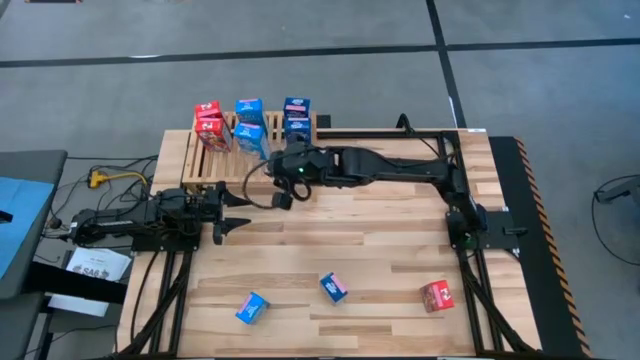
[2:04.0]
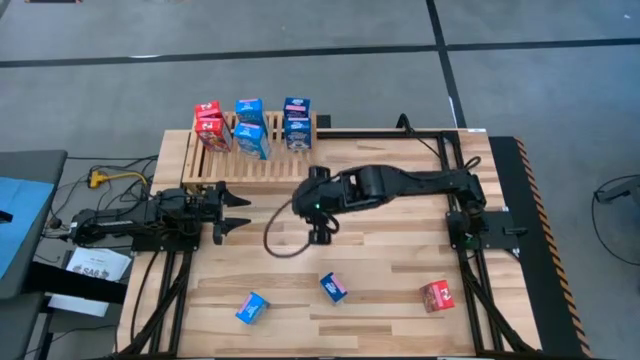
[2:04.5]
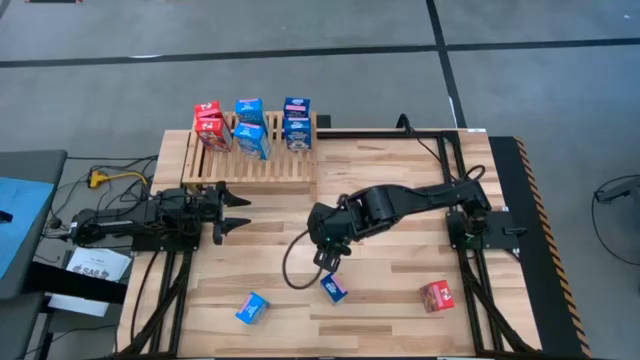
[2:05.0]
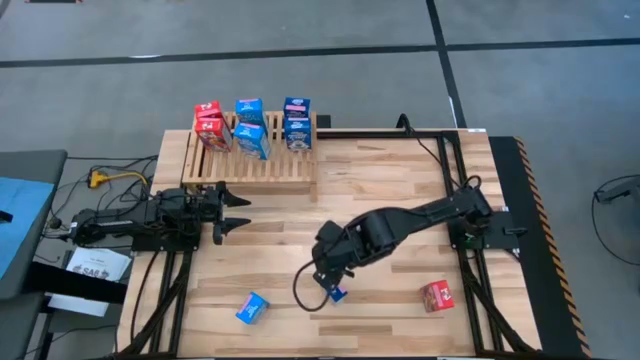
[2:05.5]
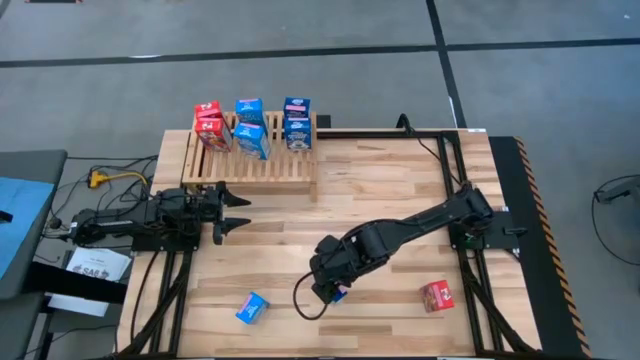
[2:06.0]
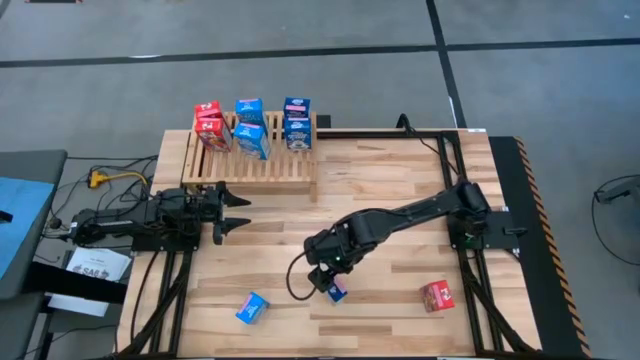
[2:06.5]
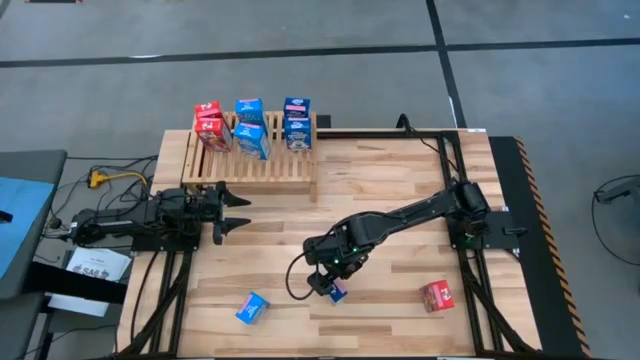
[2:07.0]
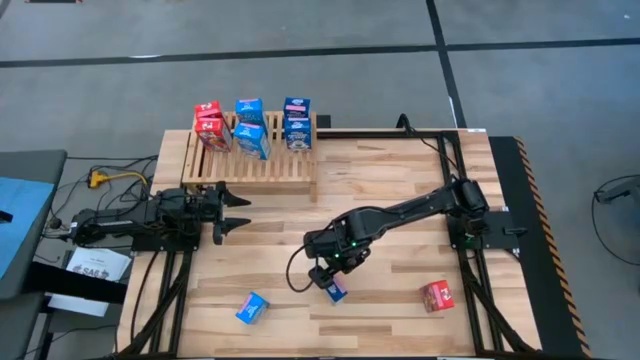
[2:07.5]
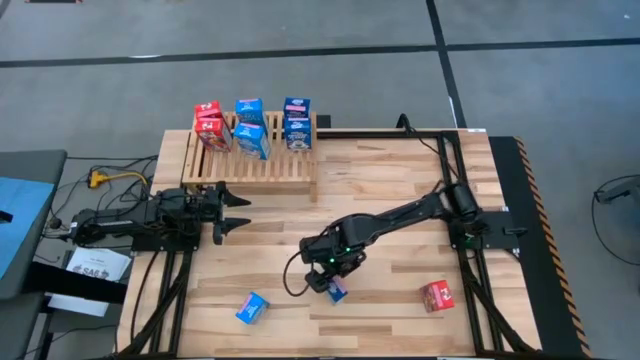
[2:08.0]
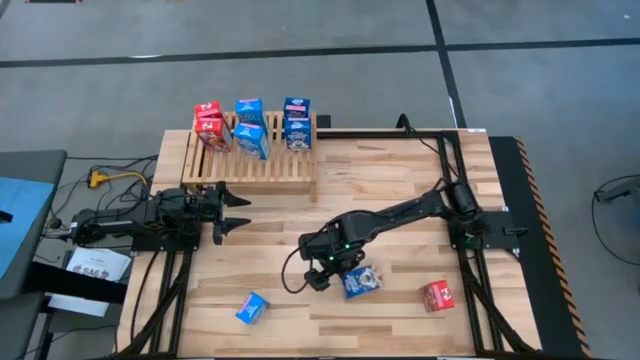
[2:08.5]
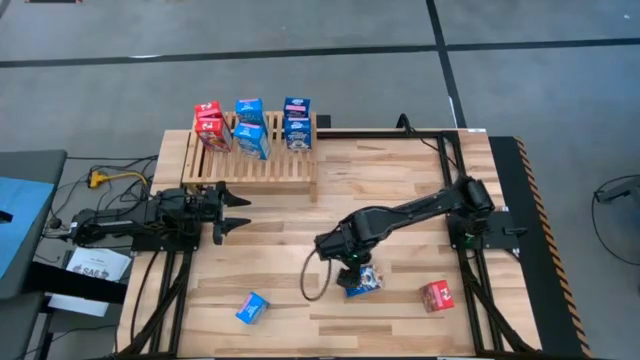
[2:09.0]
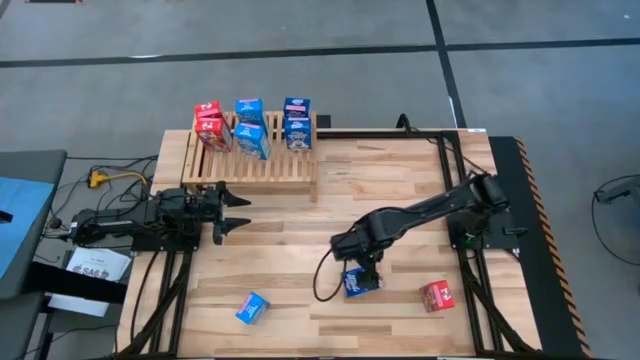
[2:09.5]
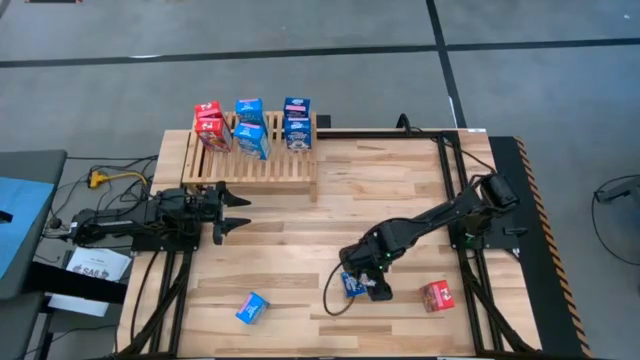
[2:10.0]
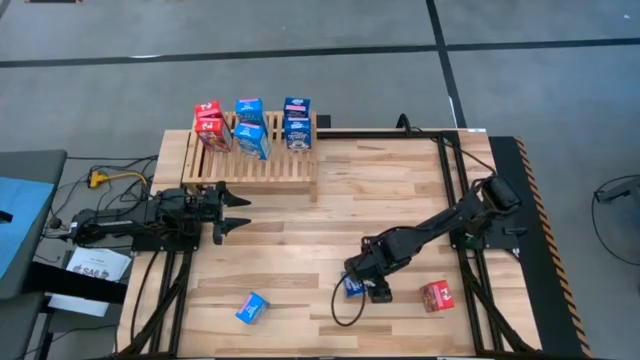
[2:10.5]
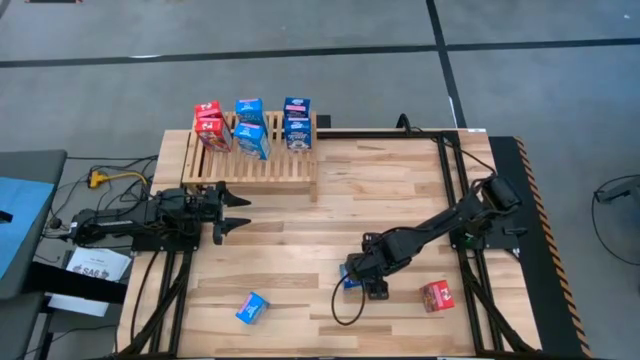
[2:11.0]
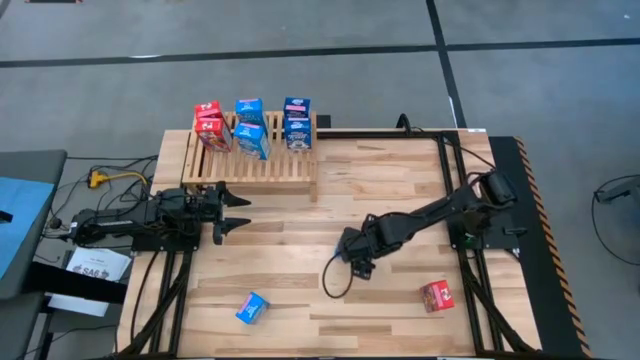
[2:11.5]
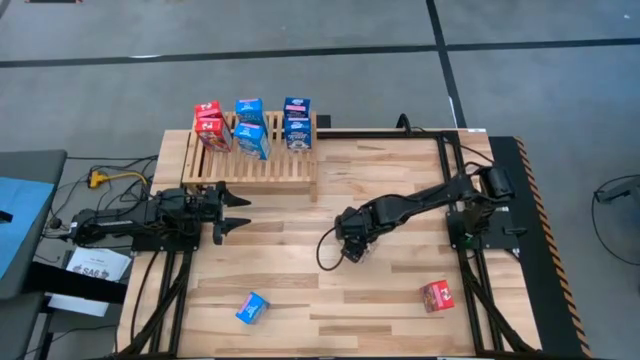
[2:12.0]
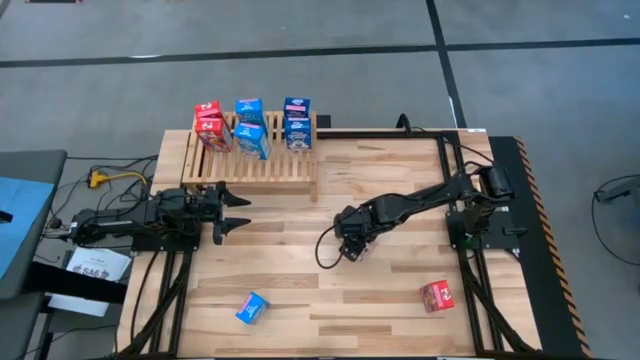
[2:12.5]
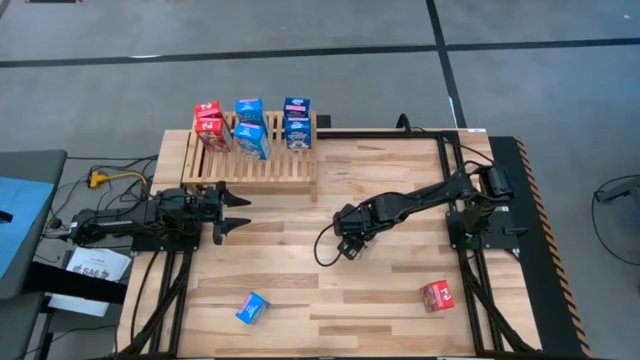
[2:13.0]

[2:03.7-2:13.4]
Task: Stack cereal on shelf
Put the dark blue cereal box the aligned with the other dark blue cereal boxes on the shelf

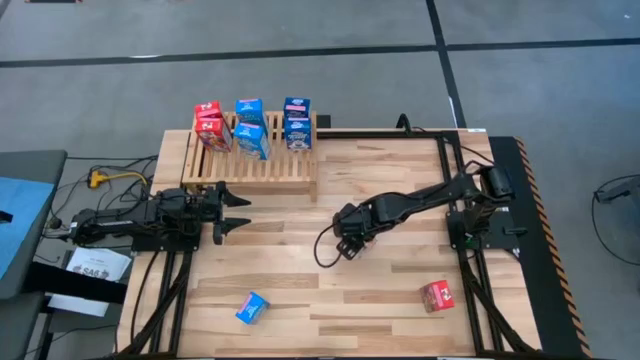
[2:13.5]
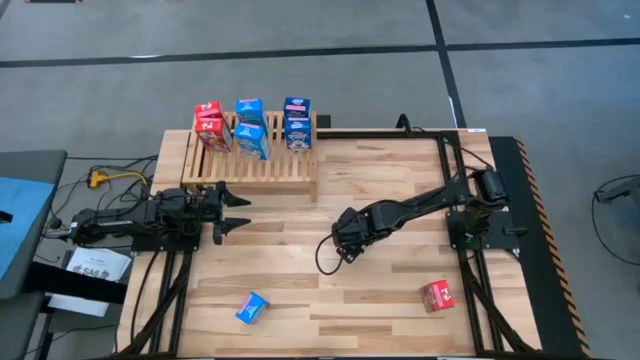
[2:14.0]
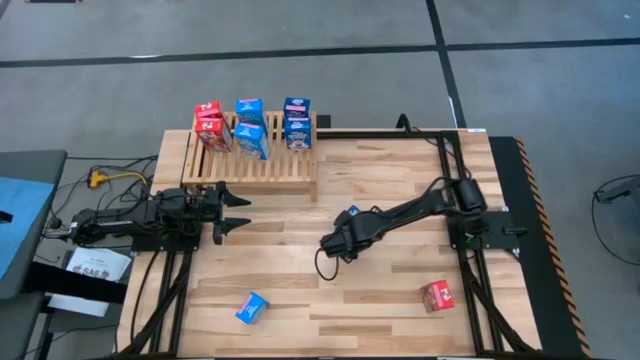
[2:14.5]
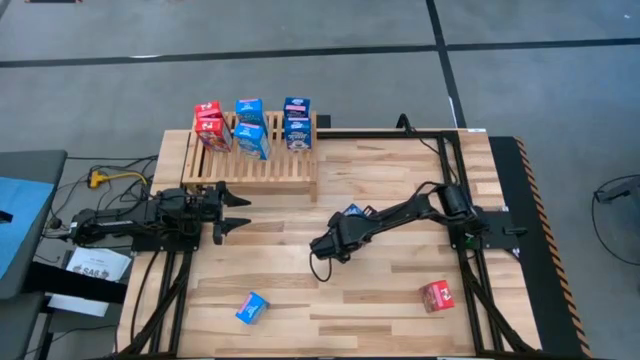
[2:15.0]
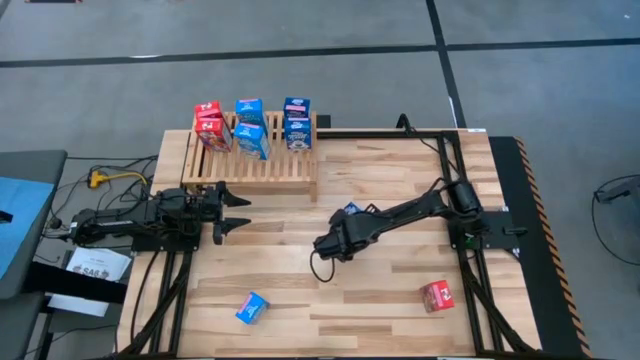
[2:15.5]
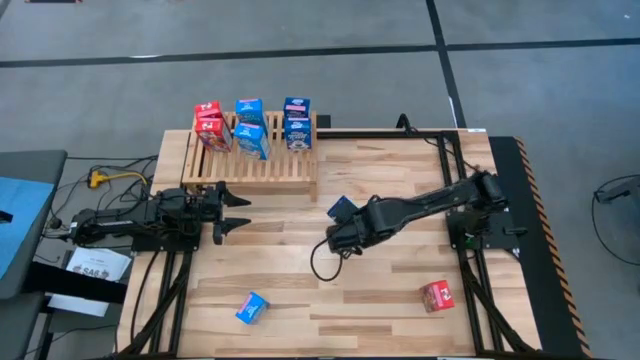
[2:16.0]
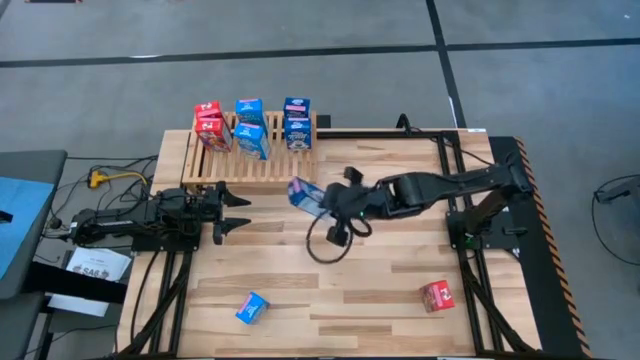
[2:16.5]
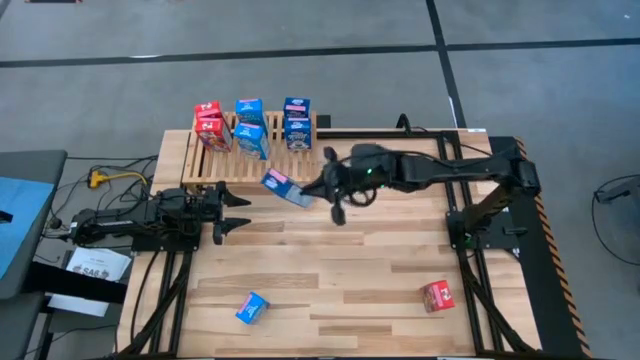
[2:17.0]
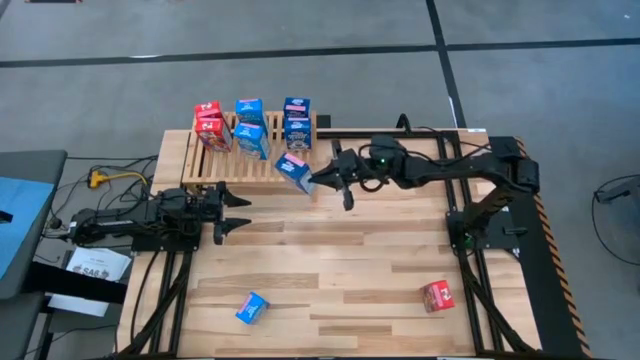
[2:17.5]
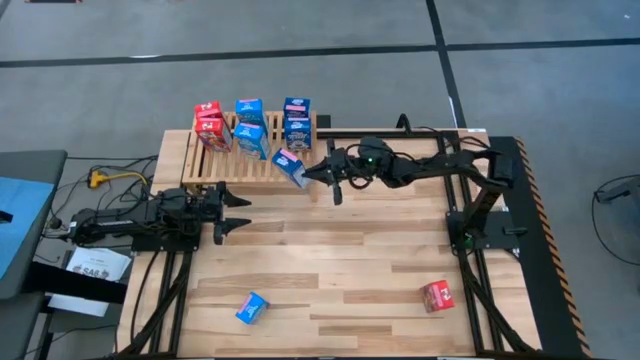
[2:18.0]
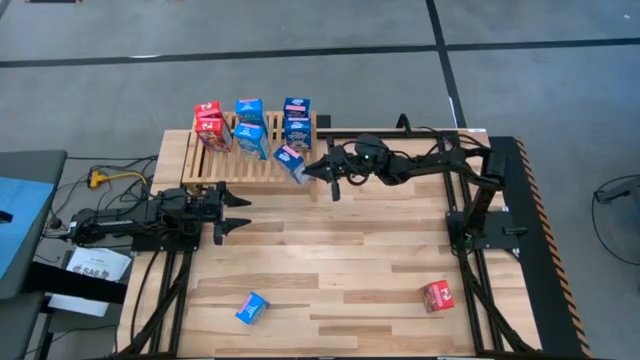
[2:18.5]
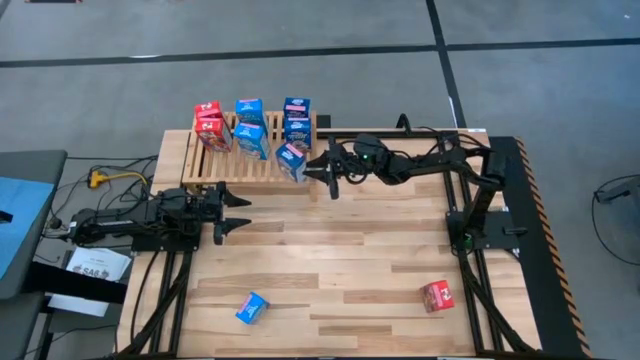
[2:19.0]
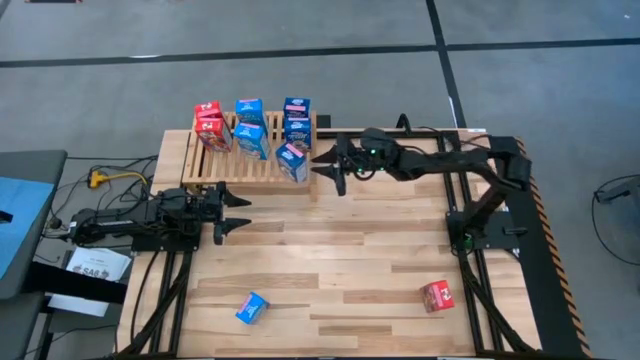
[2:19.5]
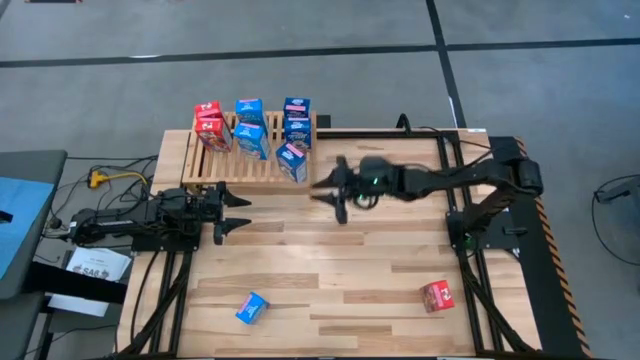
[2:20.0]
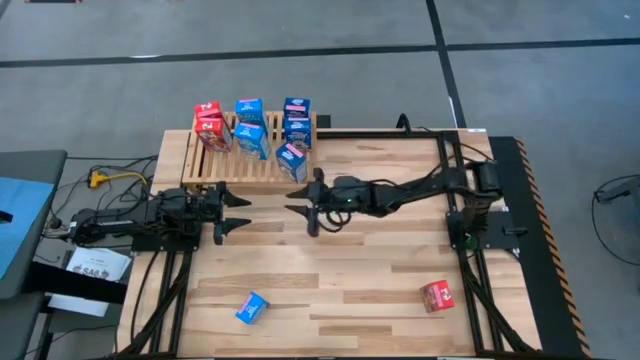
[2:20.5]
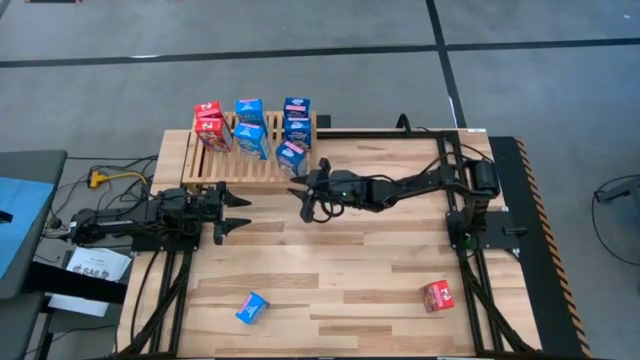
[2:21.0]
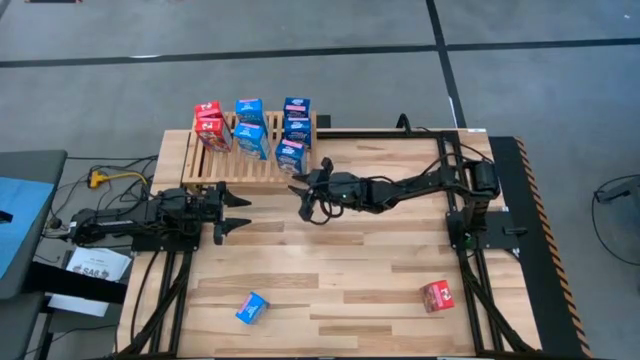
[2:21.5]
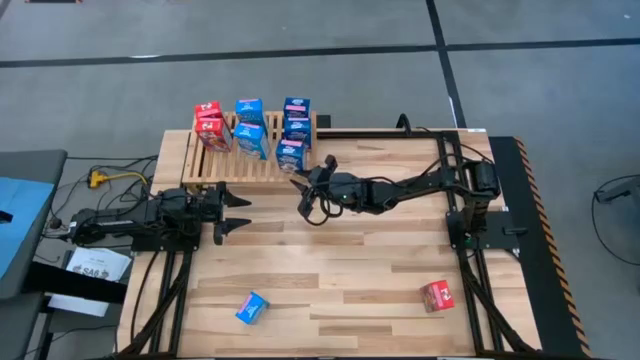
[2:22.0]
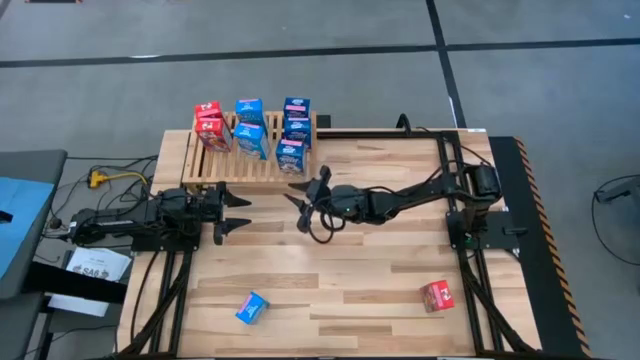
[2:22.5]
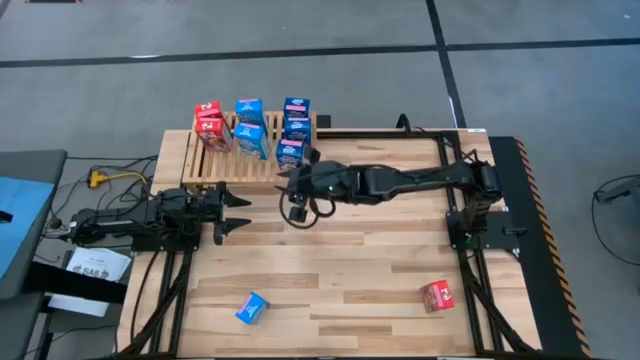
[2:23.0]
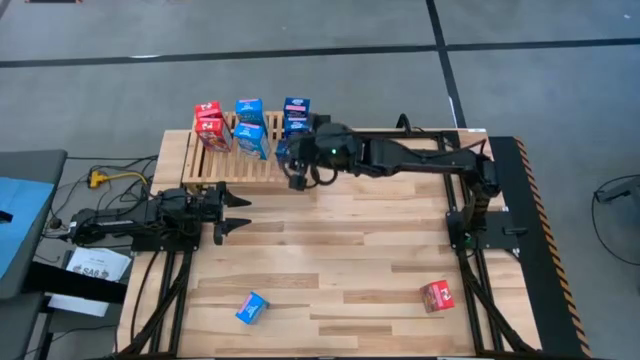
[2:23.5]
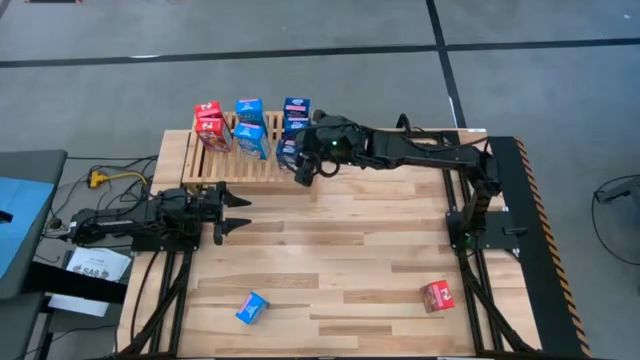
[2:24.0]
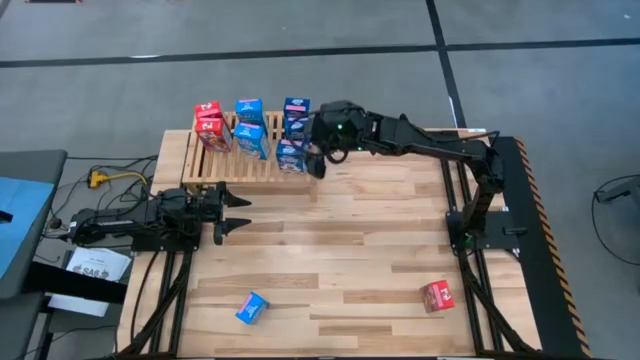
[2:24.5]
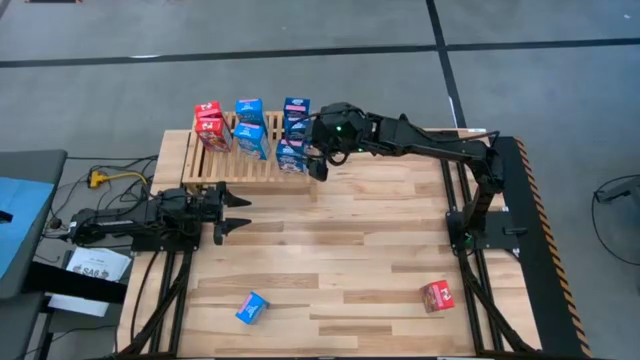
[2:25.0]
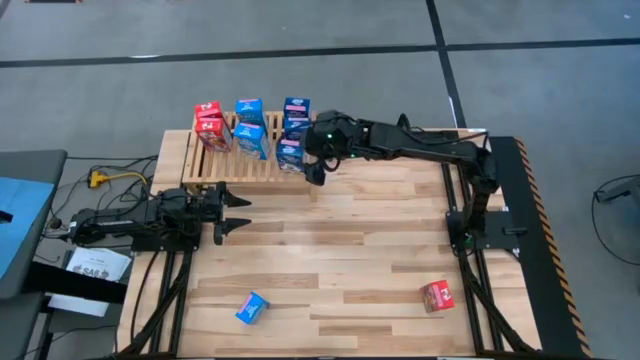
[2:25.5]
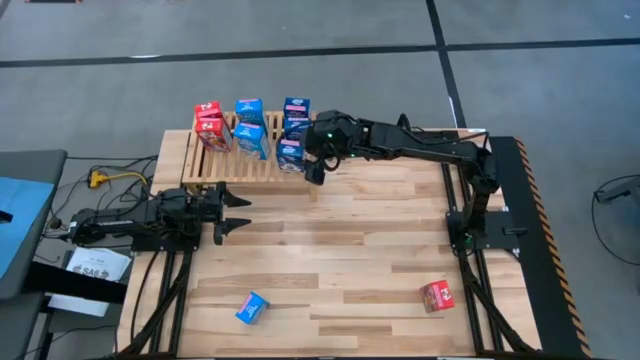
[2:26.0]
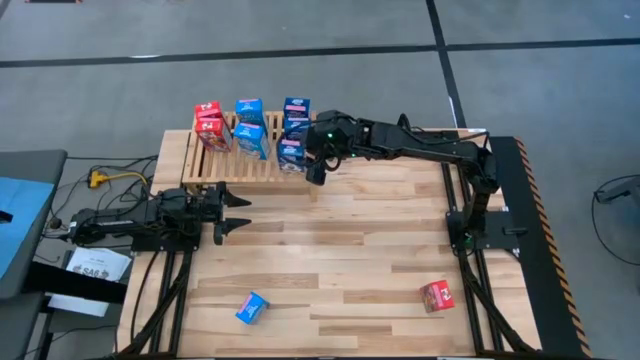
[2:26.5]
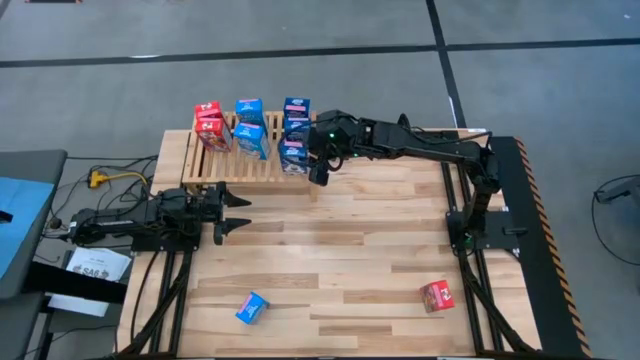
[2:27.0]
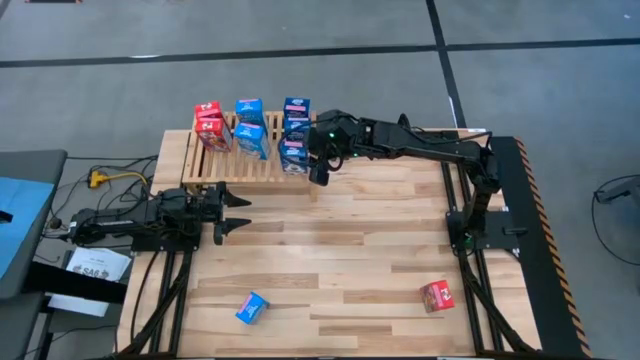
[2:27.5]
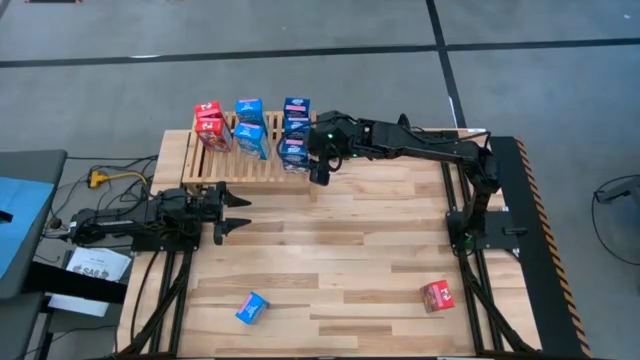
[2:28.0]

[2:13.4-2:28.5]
Put the dark blue cereal box the aligned with the other dark blue cereal boxes on the shelf
